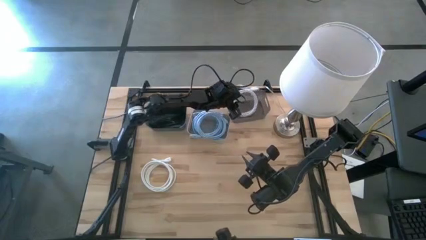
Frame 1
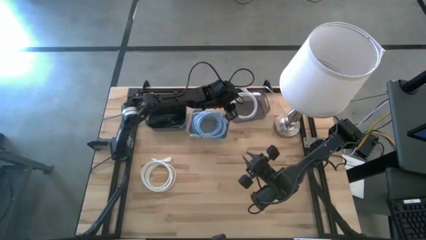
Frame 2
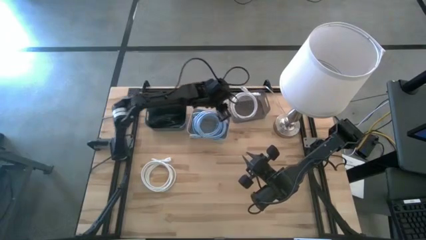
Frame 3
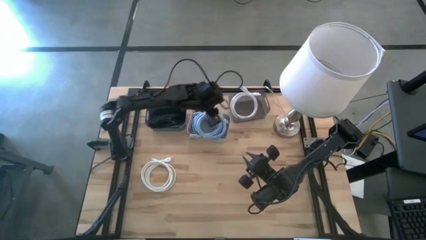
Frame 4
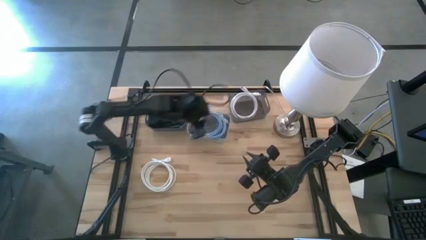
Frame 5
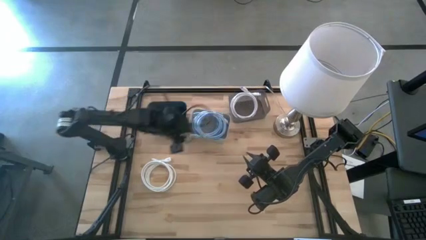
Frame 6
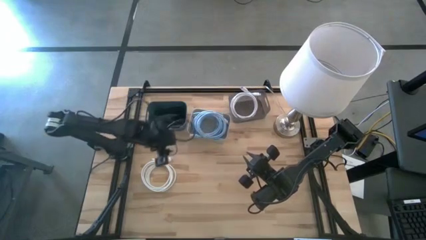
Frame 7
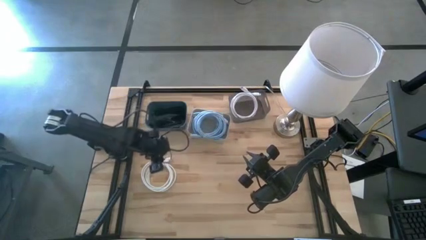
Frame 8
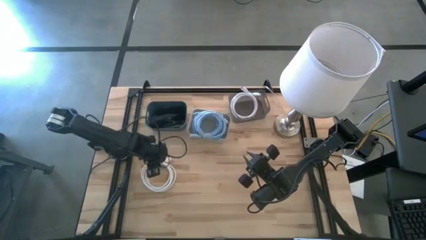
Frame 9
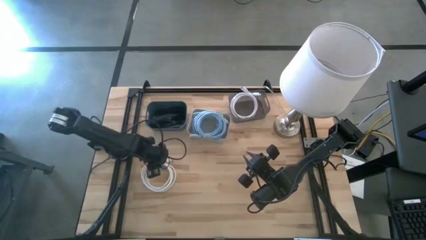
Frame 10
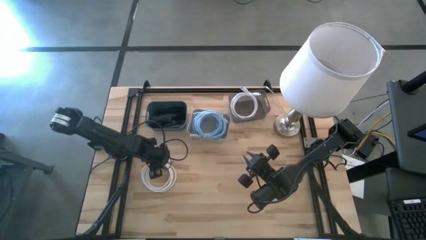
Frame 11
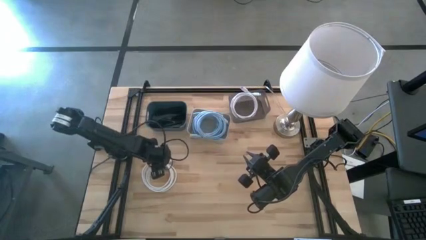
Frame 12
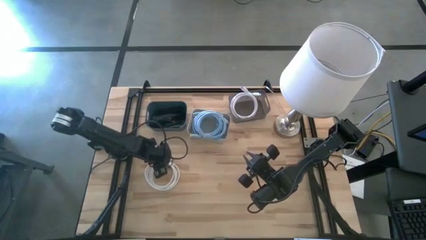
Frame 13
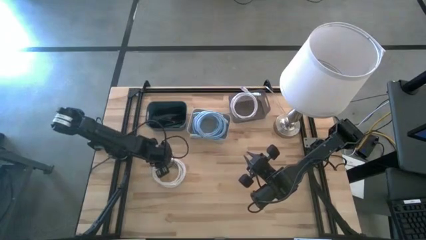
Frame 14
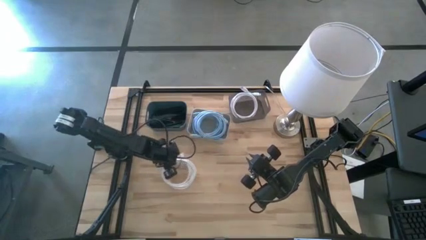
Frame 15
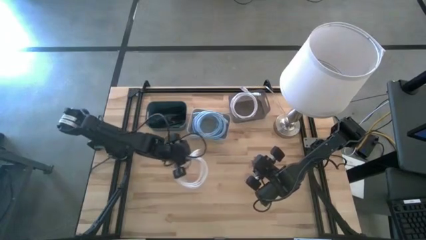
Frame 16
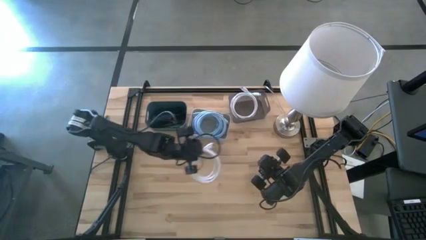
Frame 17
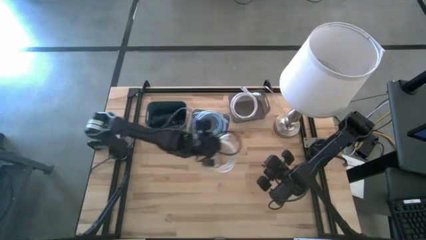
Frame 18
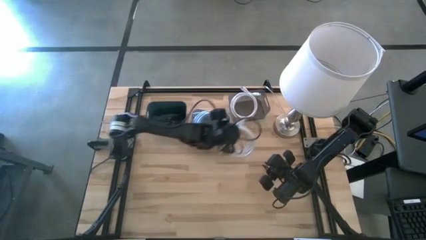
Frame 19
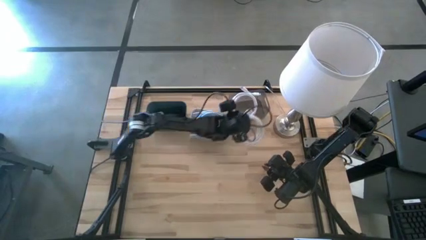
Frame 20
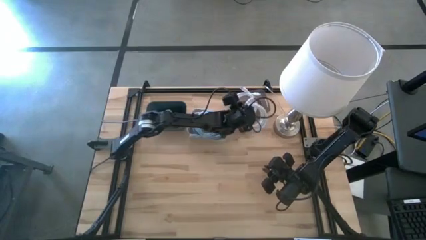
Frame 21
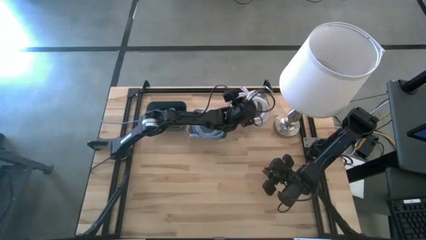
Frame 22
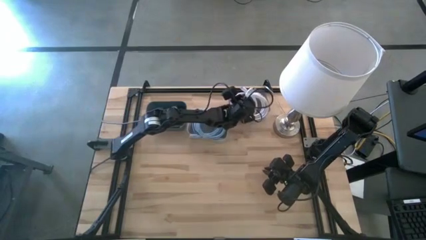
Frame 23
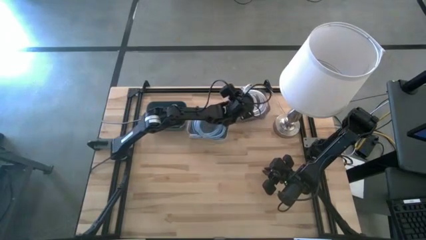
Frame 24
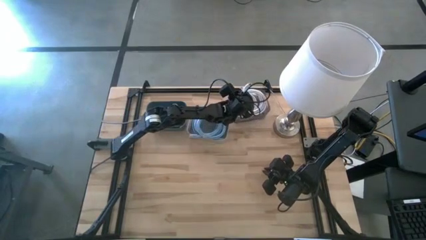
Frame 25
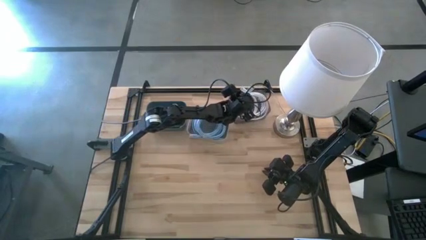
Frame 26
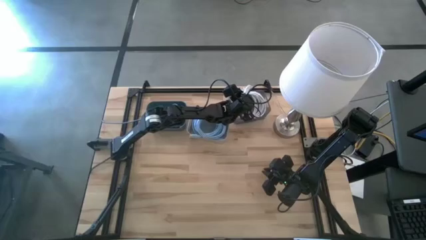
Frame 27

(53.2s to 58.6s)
Task: Pick & Place USB Port
Put the white charger cable into the black bin

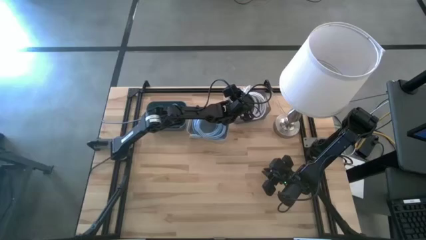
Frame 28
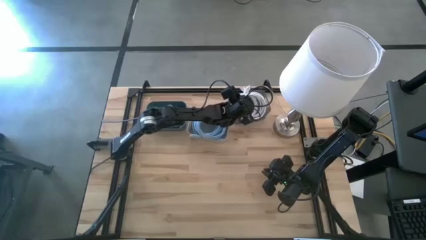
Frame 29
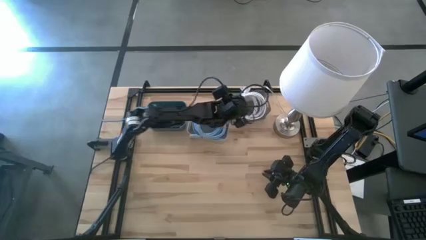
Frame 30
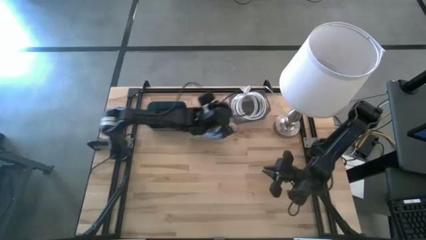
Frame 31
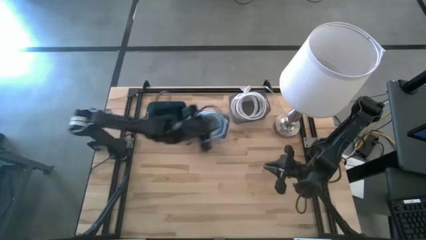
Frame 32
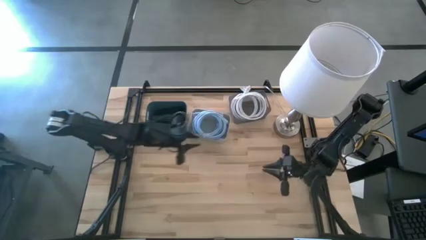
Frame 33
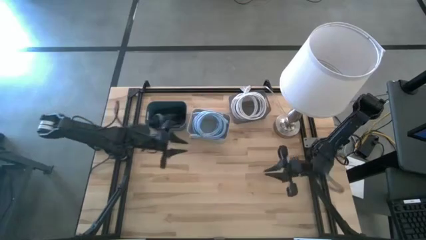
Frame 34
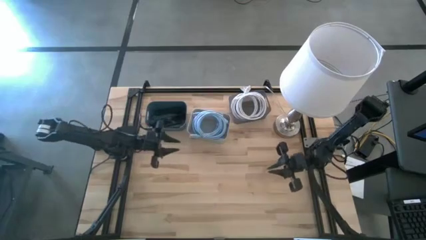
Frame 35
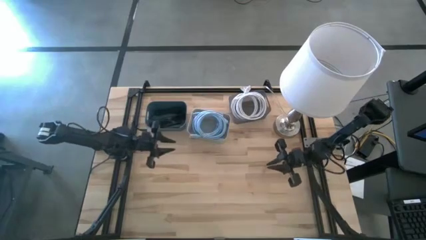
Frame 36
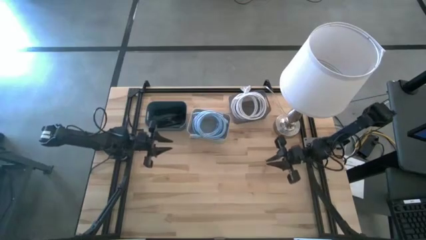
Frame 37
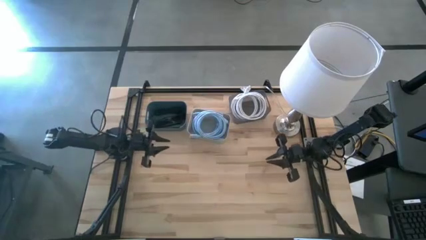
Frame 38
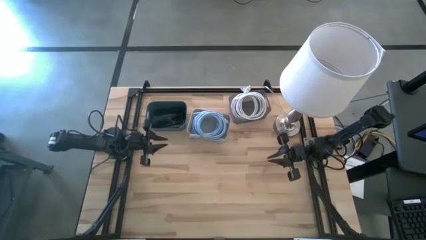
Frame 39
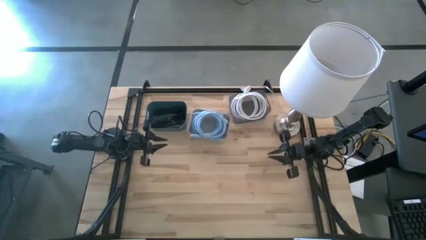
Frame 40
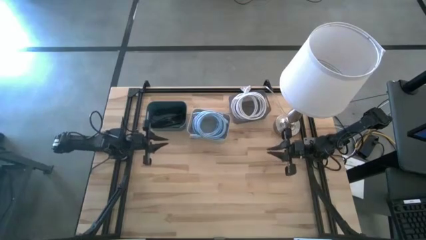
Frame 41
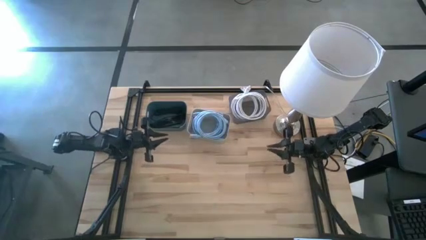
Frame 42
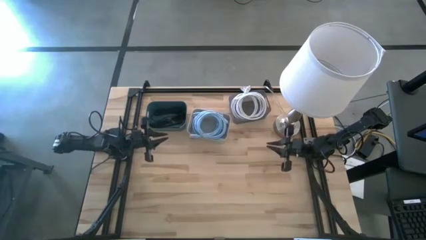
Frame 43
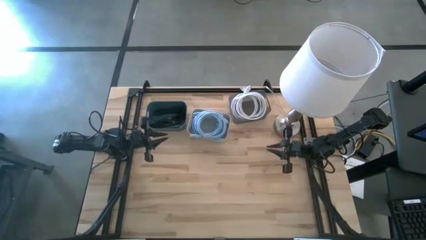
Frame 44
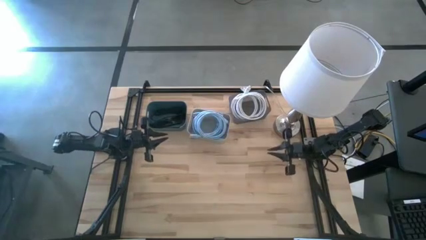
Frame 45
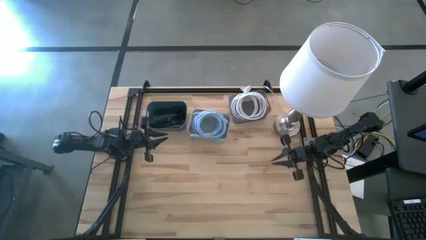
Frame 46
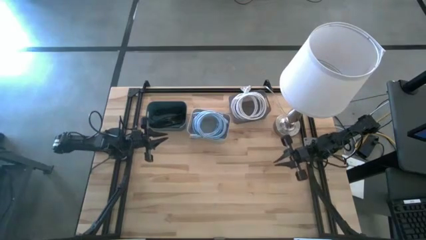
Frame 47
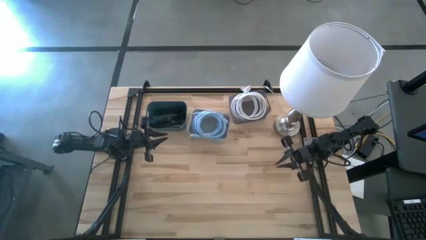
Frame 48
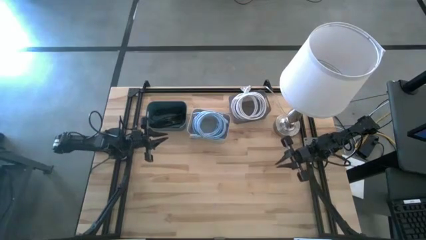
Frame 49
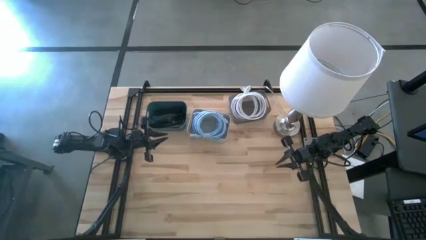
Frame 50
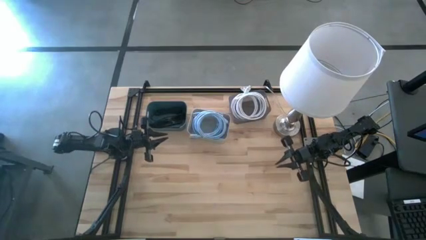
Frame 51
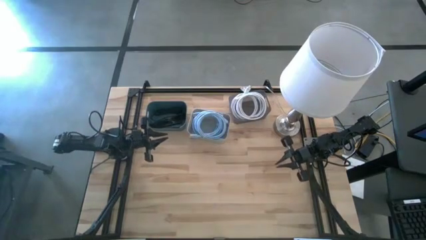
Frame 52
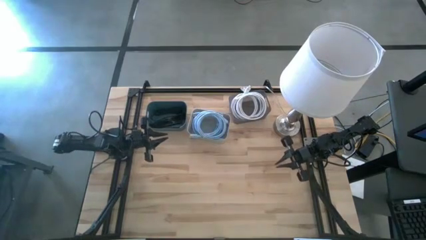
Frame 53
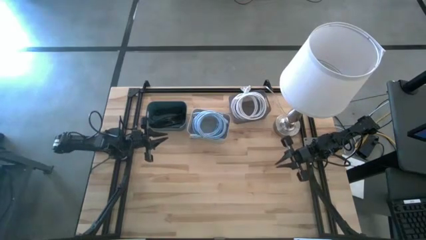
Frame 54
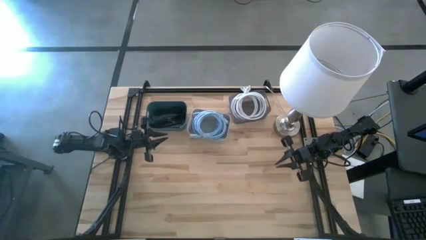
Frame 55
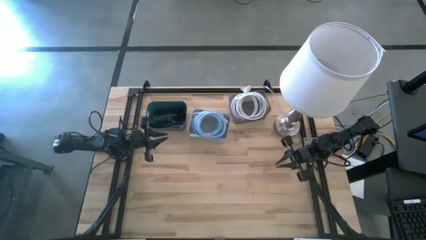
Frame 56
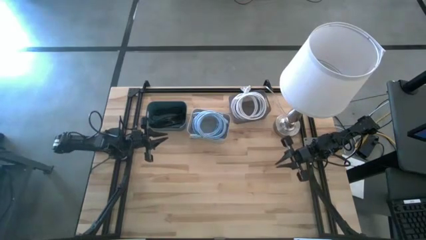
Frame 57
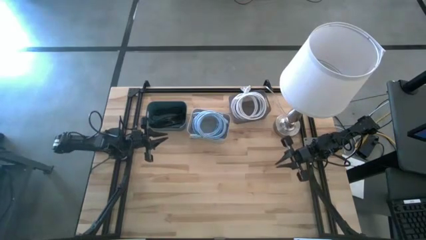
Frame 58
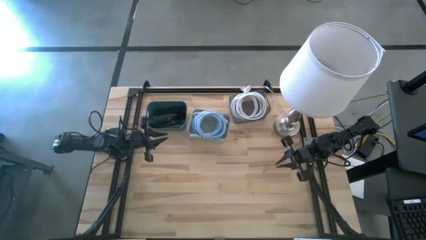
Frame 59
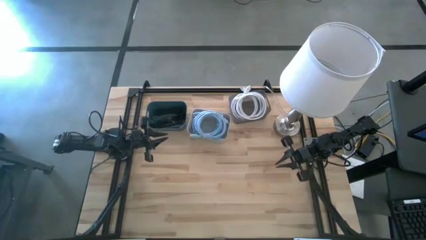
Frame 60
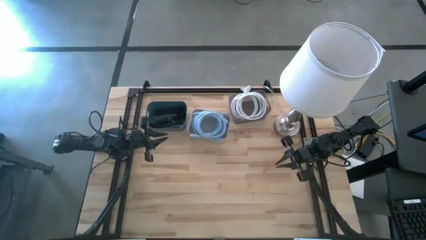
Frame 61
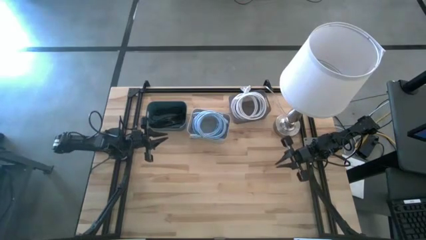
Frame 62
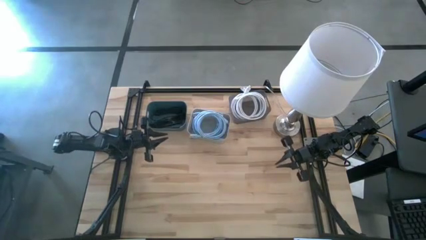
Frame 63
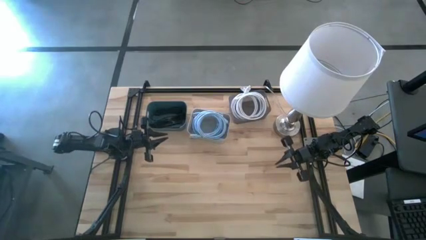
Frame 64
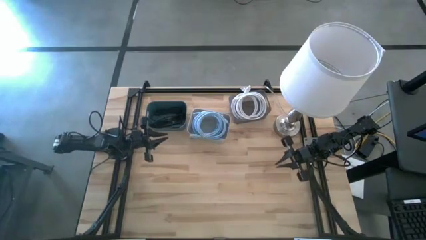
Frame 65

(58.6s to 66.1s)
Return to Home Position

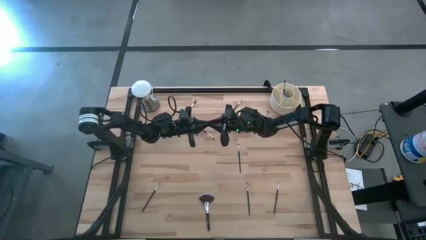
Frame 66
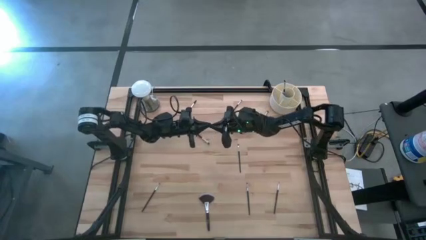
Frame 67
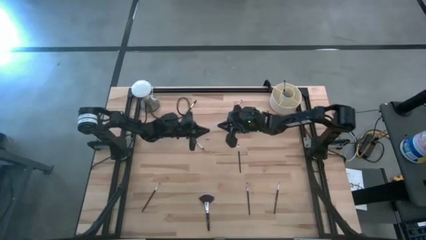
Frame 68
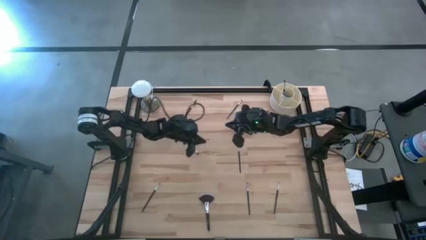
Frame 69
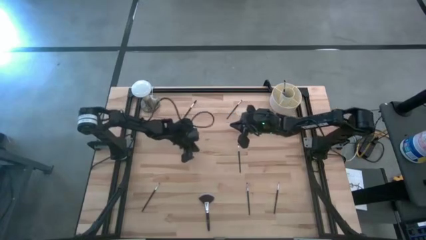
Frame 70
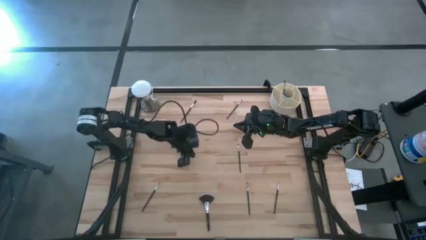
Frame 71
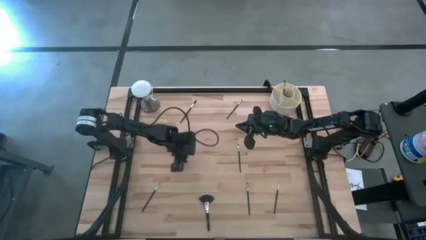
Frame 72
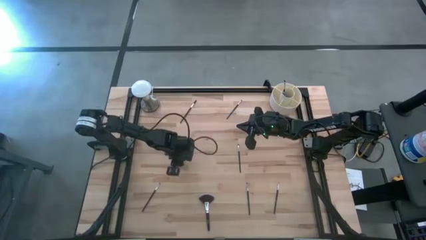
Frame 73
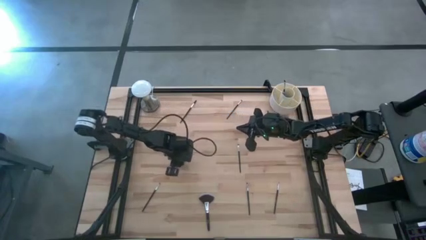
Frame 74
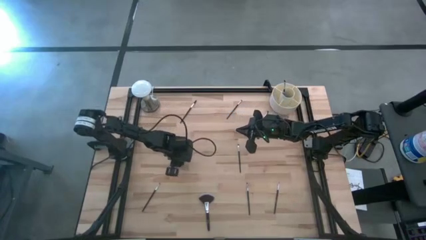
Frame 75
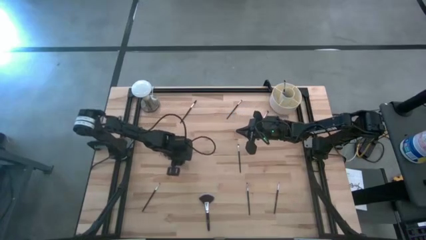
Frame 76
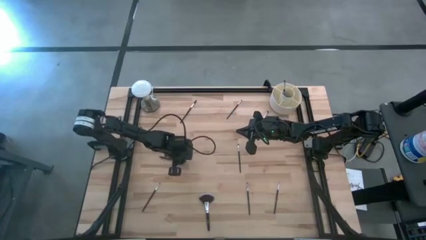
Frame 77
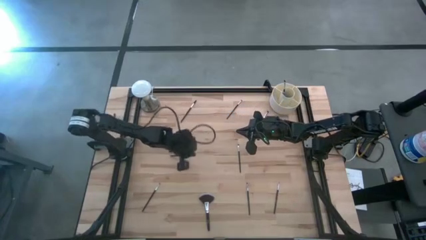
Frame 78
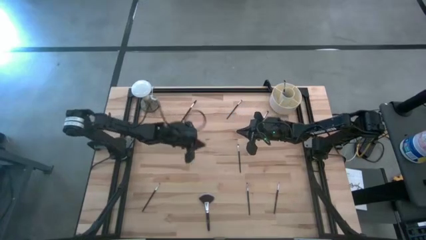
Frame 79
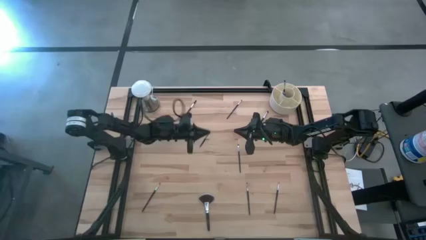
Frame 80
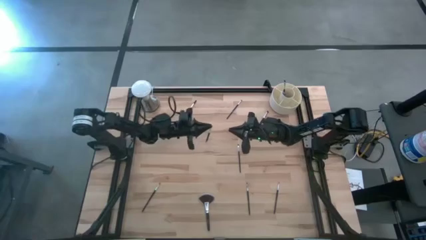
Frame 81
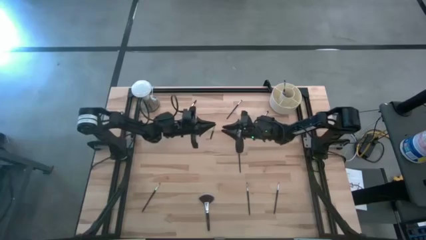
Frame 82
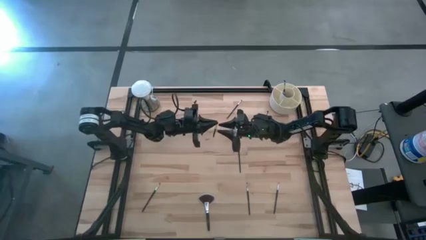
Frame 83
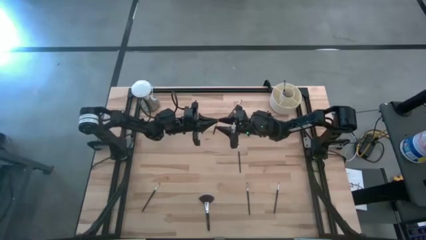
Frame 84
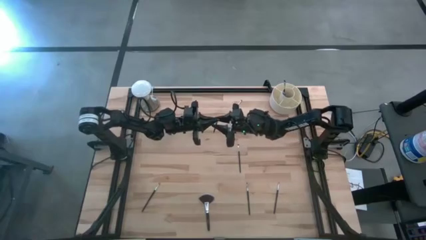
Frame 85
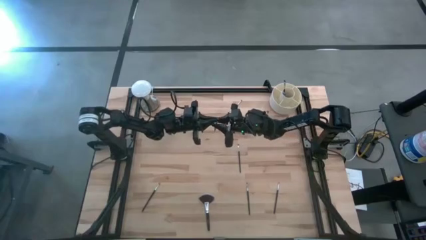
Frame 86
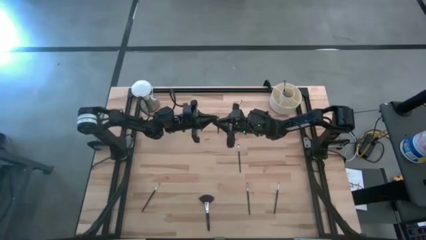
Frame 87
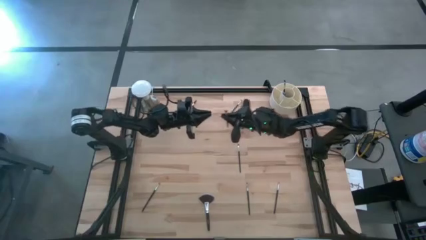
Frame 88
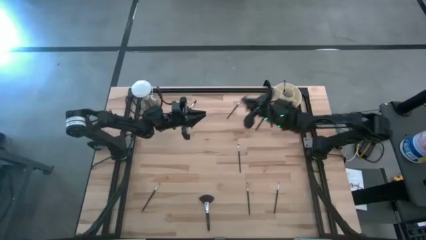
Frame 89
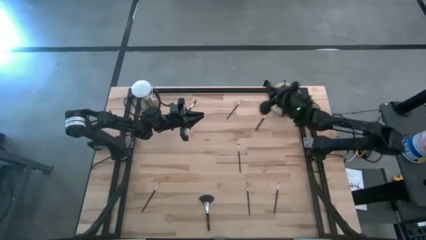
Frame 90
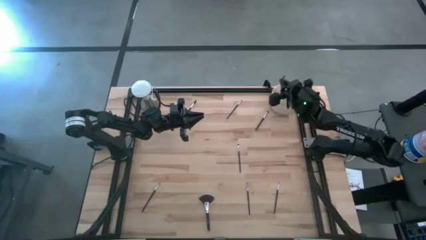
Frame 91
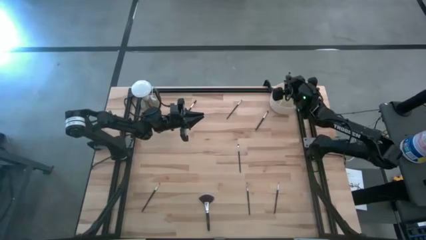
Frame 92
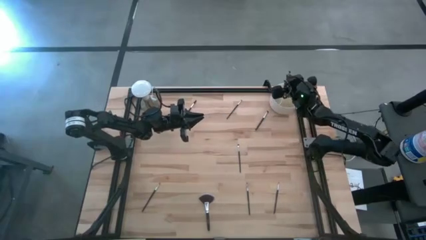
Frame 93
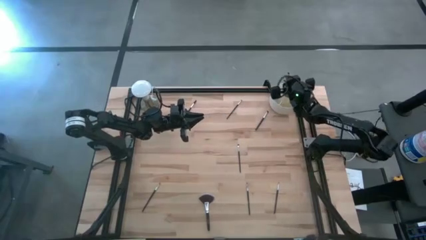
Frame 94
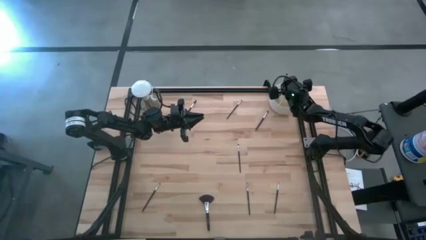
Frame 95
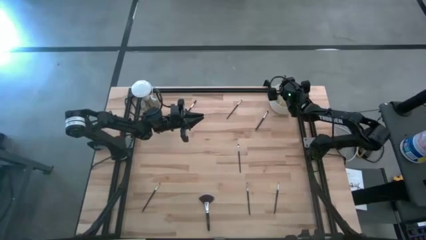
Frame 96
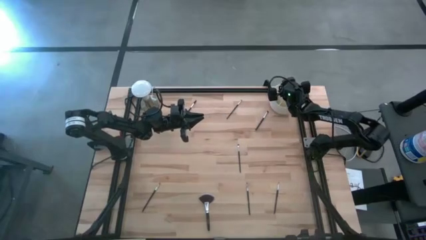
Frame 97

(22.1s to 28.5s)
Task: Pick & Place Makeup Brushes
Put the black powder brush into the white makeup holder
